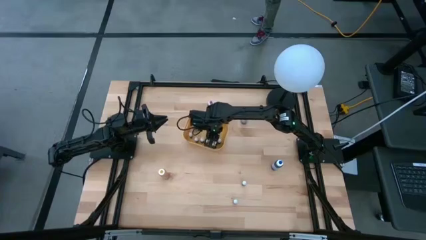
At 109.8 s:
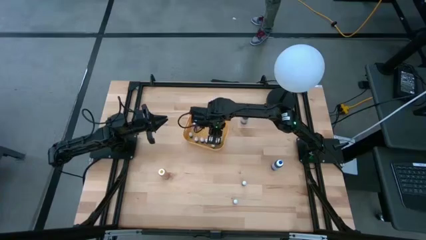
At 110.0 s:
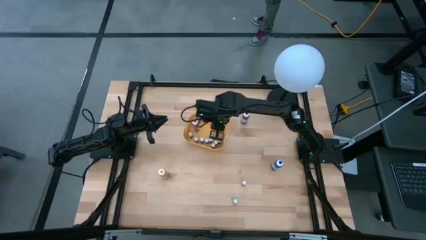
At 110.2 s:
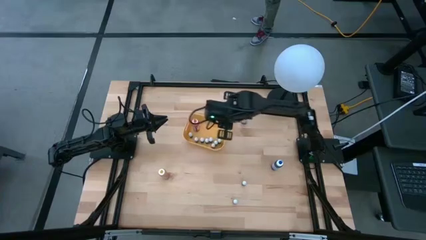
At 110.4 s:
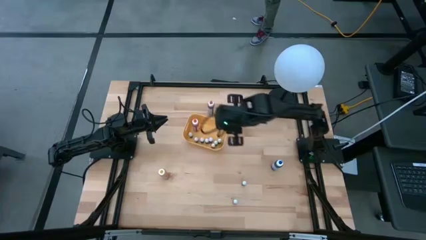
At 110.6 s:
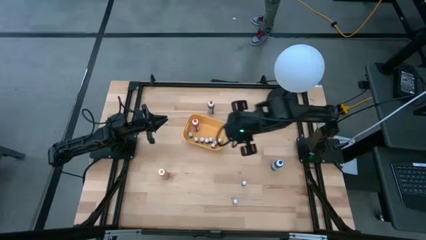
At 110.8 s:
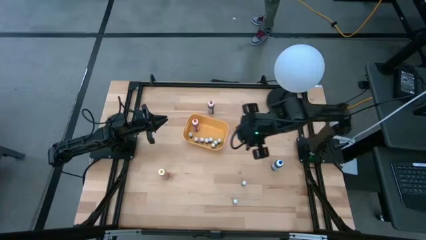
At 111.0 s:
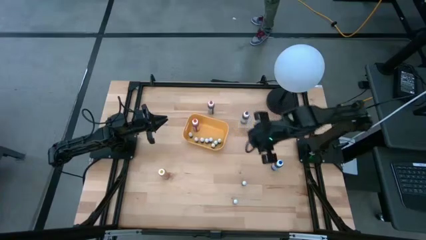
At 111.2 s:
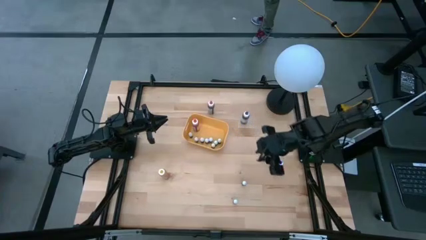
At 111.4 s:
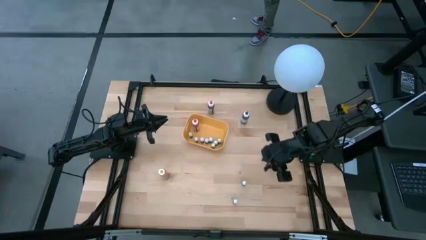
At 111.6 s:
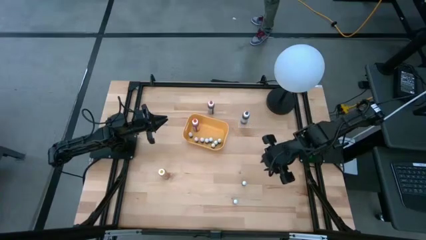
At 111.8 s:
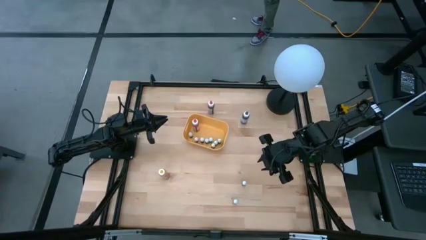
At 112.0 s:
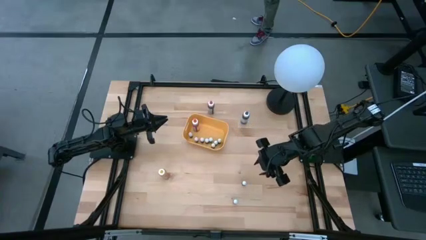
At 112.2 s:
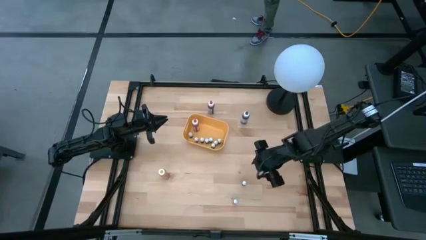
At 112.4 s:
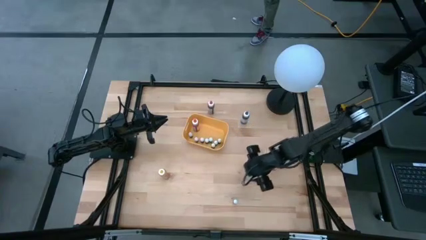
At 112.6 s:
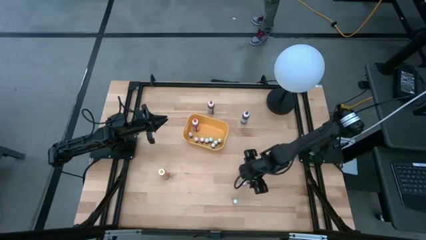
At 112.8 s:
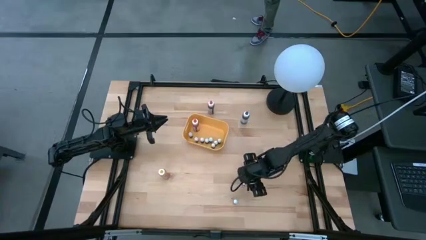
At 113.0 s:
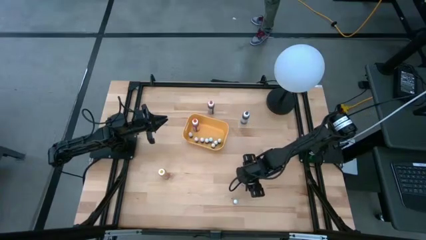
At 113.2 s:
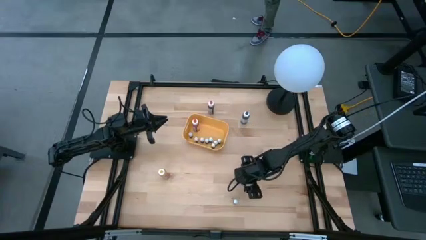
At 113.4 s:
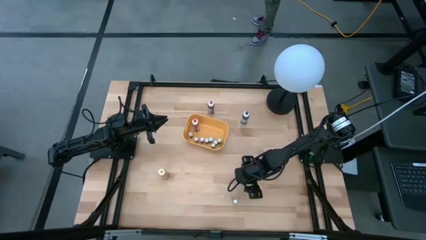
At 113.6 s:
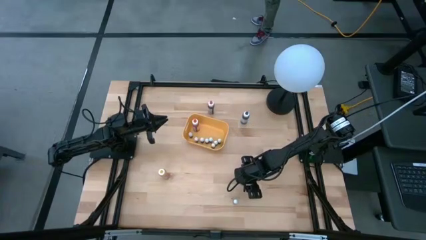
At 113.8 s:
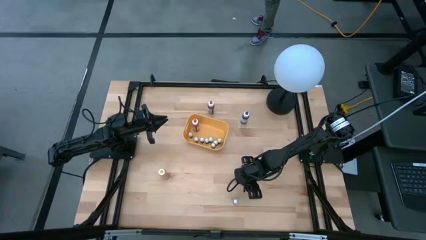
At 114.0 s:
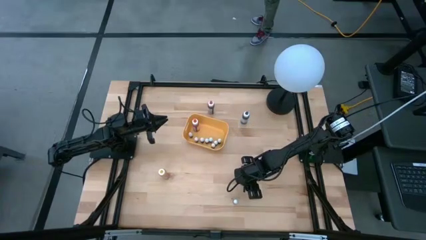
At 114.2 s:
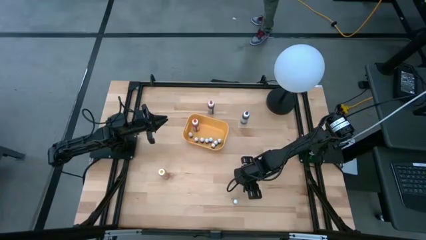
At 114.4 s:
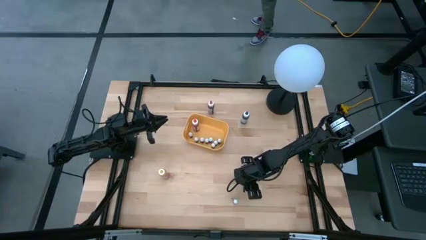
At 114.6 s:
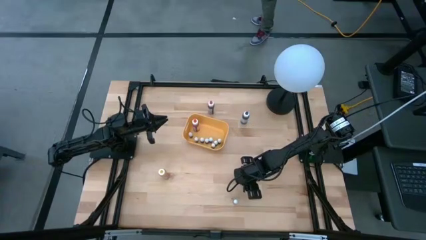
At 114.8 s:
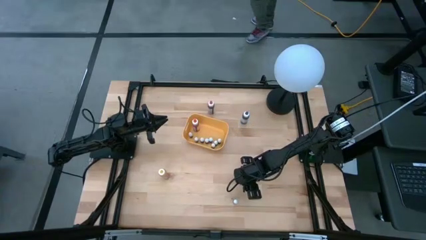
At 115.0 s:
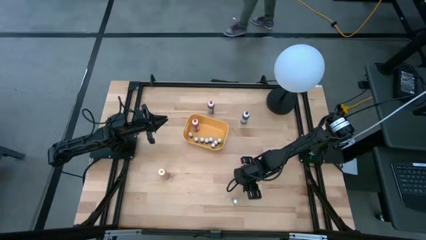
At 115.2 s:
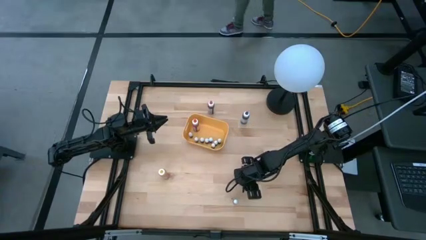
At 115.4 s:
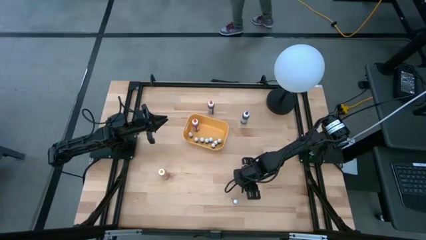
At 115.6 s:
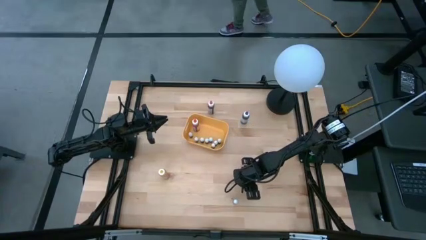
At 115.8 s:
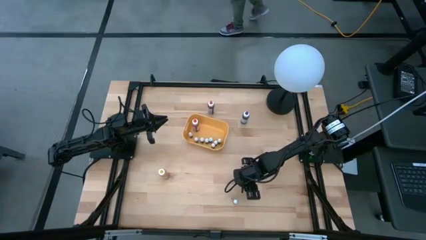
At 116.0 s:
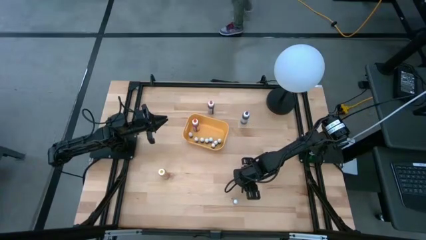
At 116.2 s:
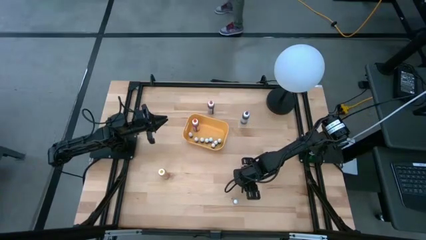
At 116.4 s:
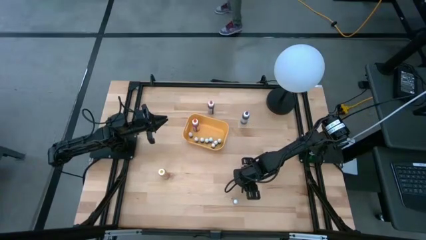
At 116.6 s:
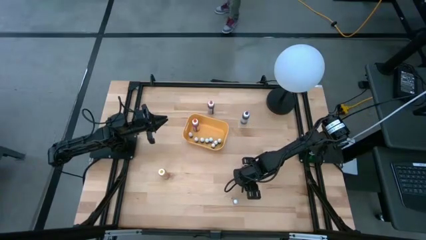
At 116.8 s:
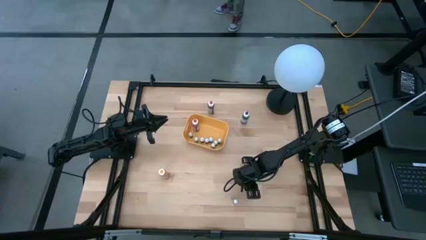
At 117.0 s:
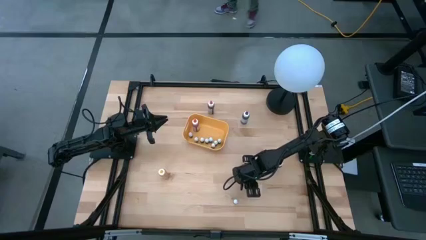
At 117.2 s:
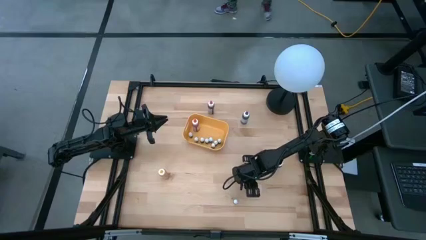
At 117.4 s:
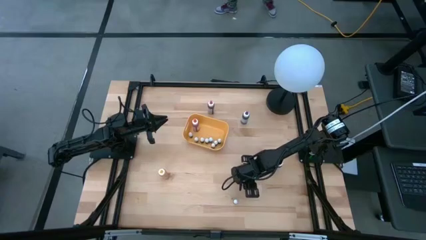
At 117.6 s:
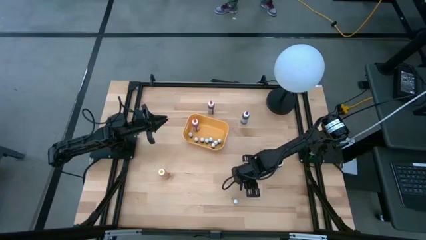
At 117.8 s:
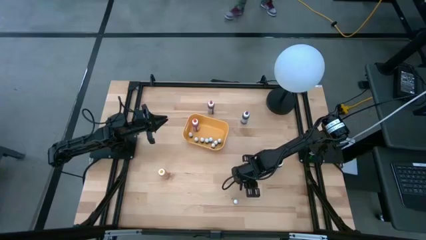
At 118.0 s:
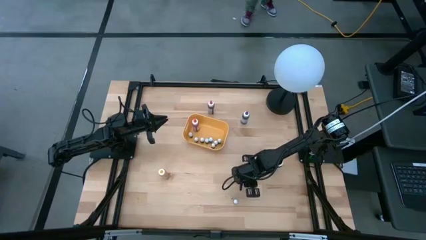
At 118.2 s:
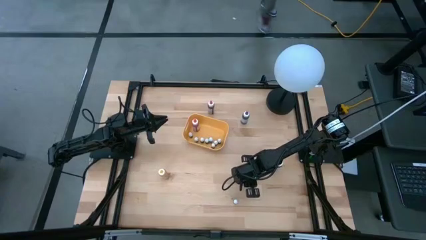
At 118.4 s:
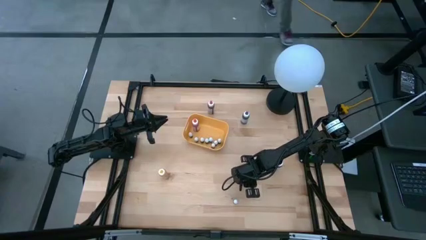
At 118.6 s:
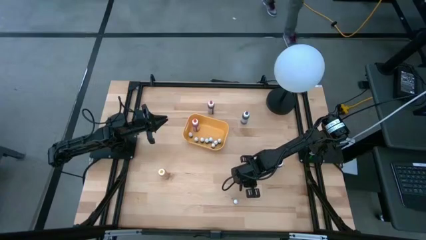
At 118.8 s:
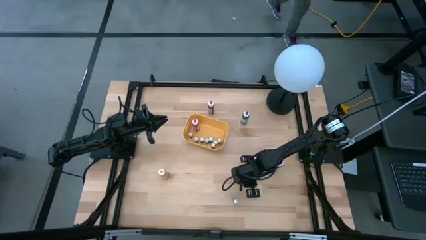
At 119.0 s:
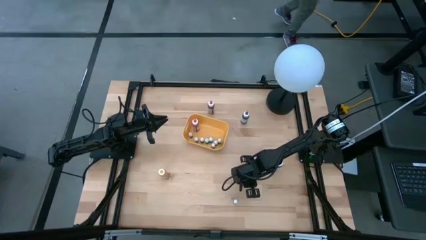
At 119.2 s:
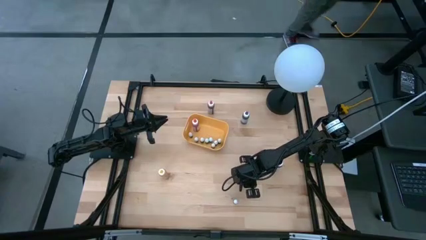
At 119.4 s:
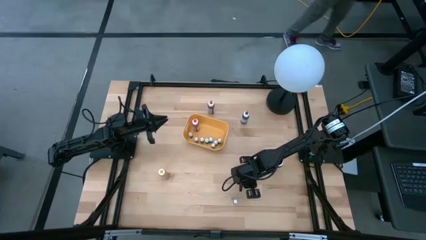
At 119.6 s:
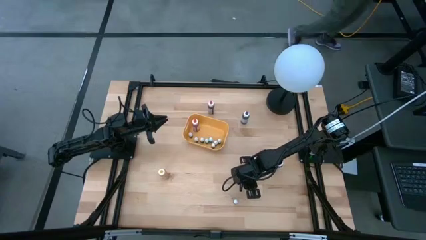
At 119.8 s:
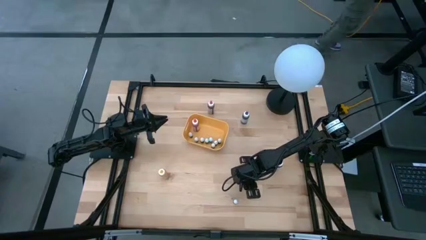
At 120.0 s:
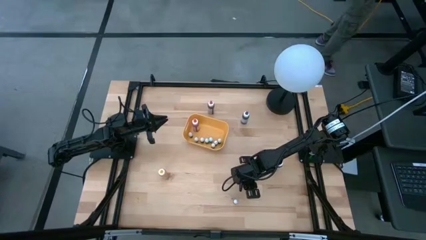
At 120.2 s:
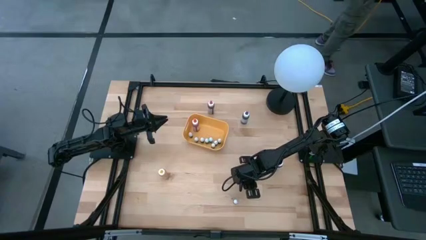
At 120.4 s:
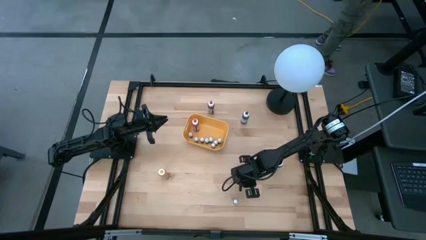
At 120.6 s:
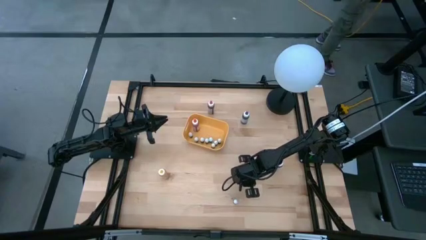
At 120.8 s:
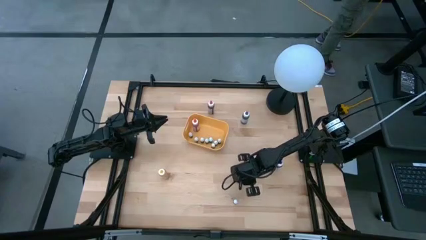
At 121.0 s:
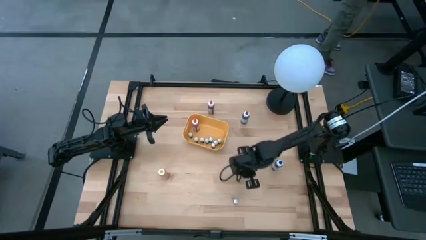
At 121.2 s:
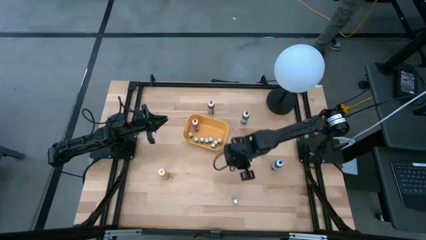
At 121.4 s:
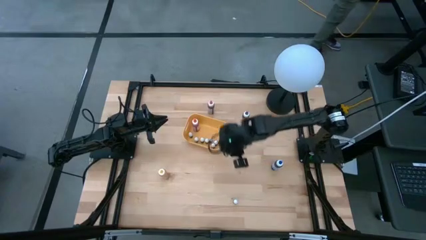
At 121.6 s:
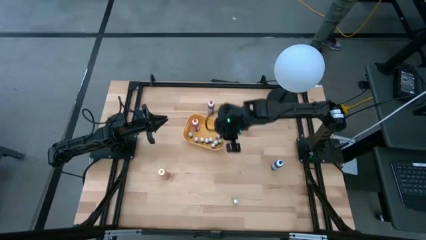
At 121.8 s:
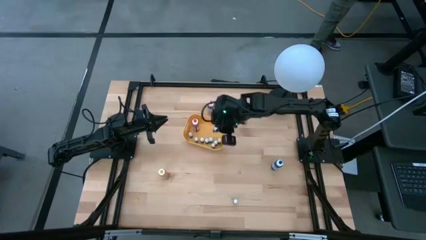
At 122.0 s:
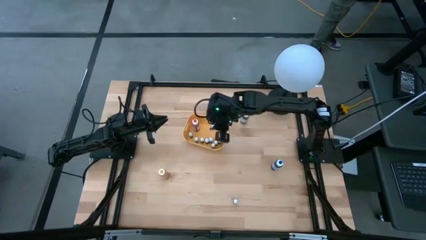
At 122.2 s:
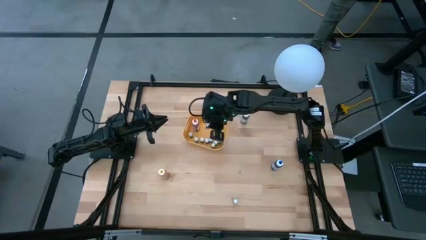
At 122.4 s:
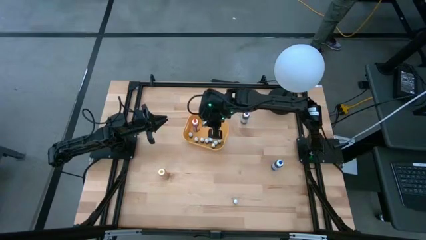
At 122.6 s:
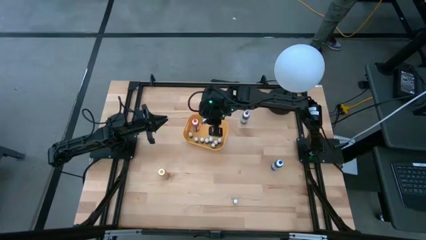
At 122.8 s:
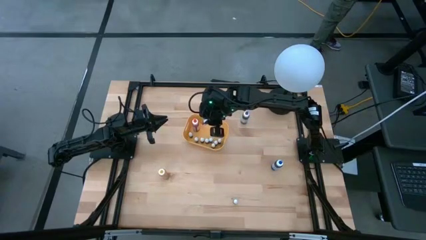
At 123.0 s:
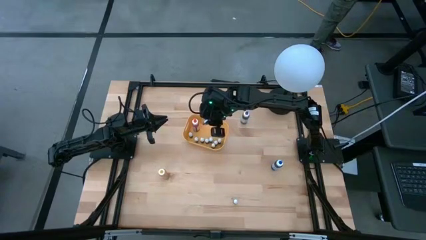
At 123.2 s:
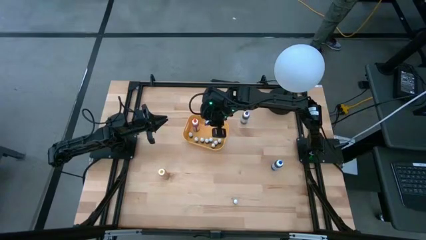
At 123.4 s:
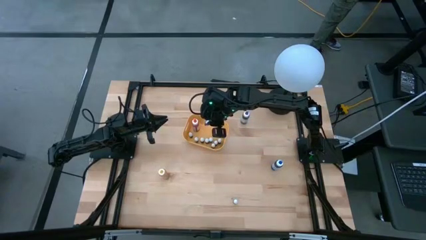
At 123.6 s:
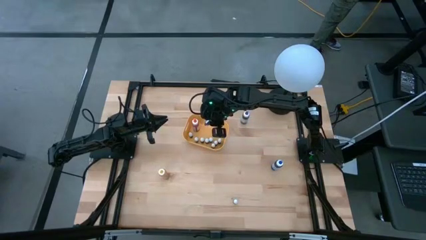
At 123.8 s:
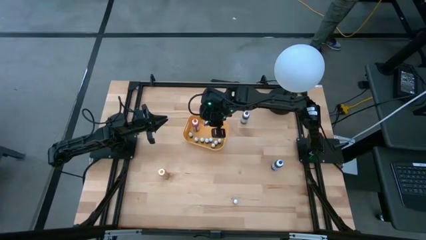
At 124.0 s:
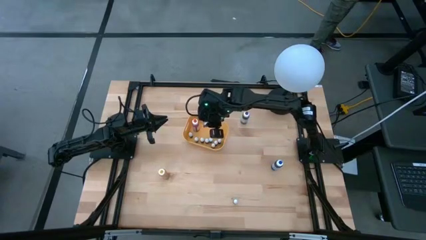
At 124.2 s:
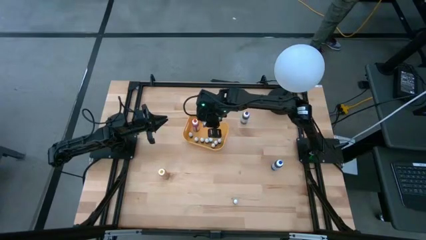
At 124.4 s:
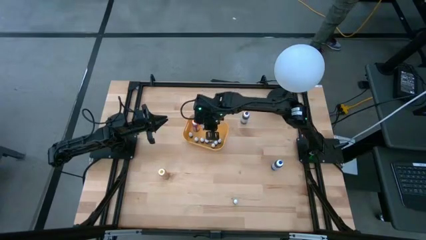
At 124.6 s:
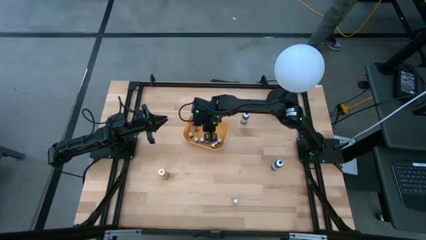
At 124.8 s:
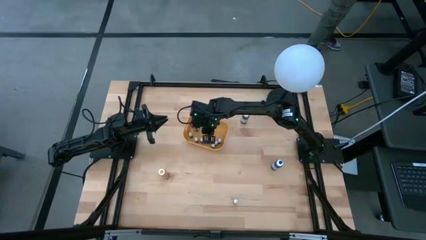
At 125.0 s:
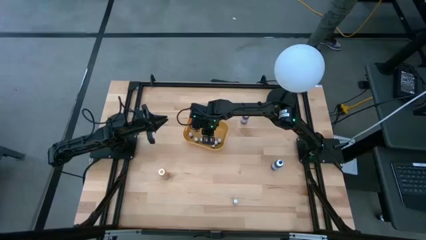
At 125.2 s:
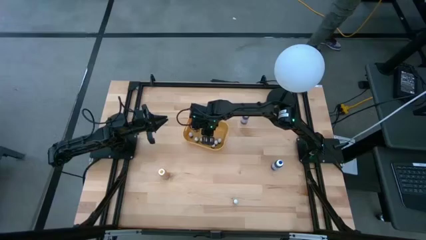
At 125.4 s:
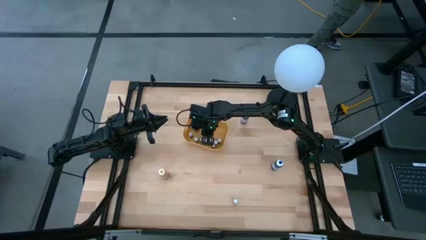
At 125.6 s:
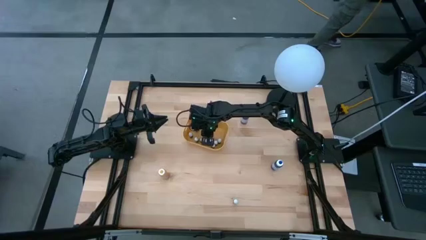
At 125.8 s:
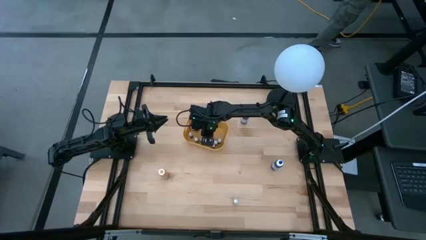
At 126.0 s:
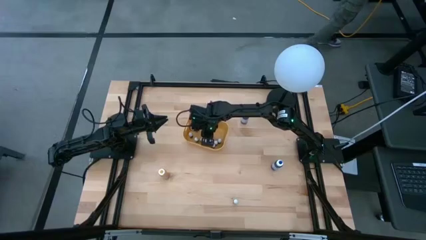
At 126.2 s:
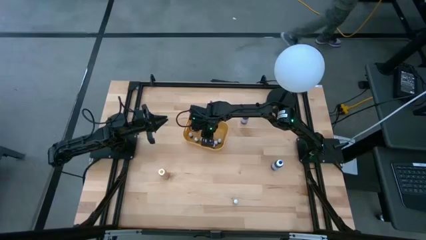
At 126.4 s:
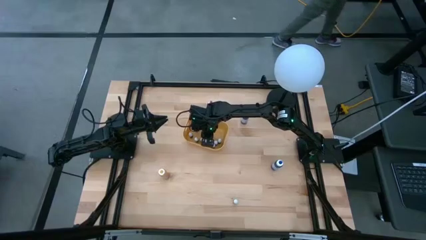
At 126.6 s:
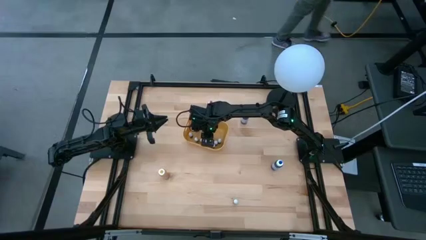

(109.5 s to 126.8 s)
Task: Pick & Place food coloring
Put the small purple food coloring bottle into the yellow bin
